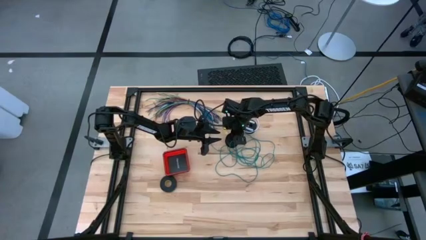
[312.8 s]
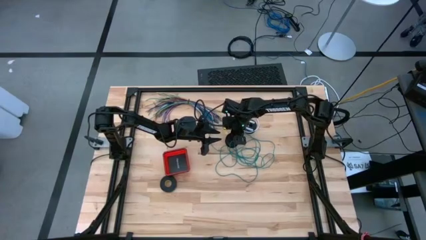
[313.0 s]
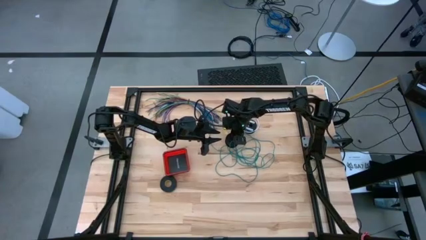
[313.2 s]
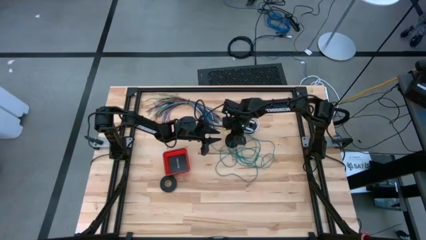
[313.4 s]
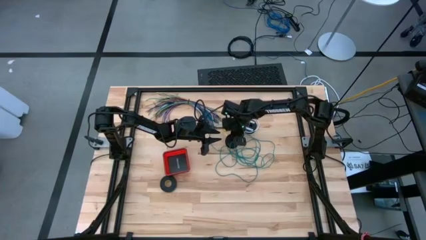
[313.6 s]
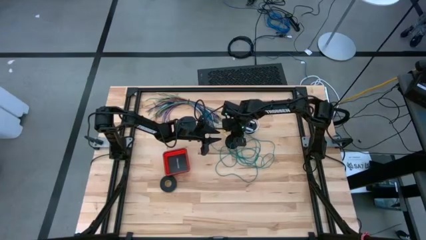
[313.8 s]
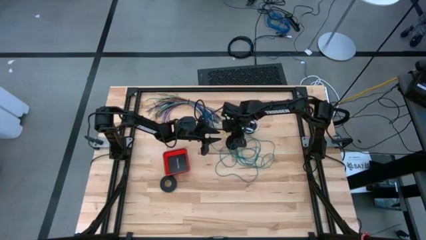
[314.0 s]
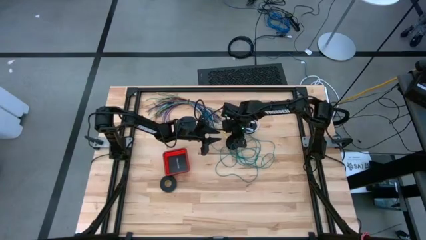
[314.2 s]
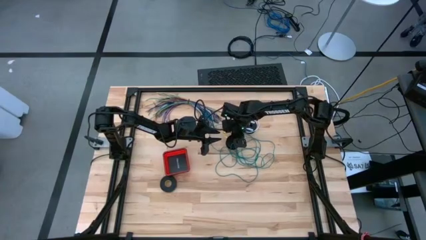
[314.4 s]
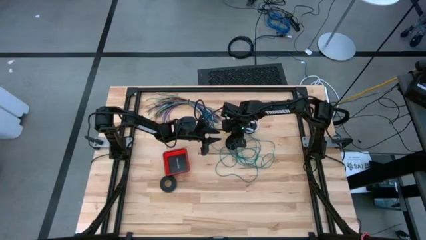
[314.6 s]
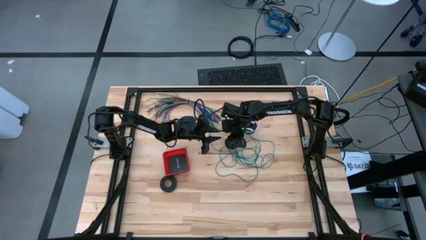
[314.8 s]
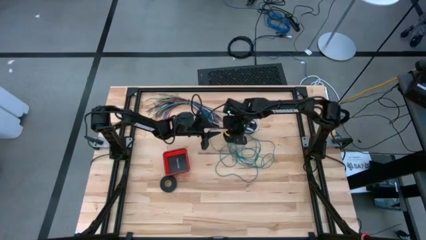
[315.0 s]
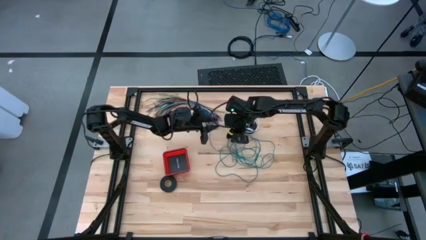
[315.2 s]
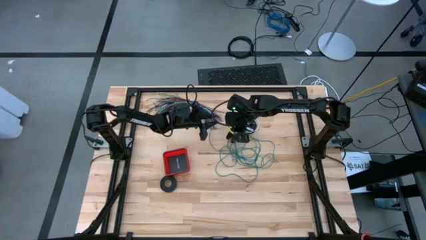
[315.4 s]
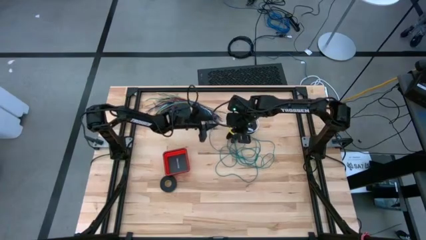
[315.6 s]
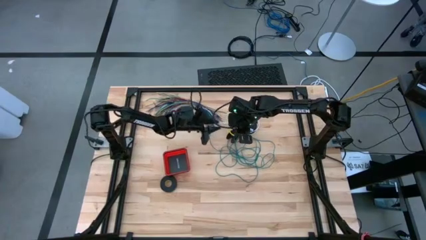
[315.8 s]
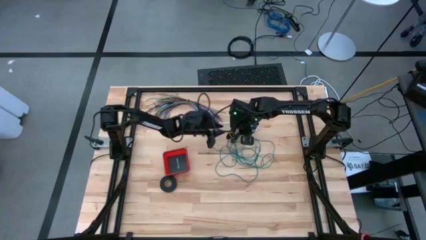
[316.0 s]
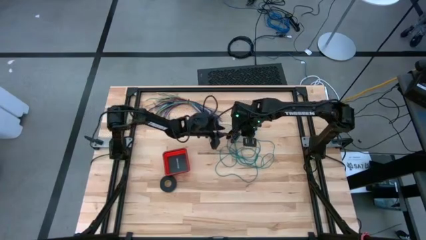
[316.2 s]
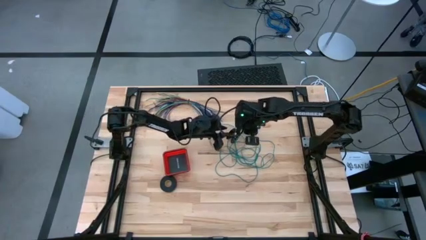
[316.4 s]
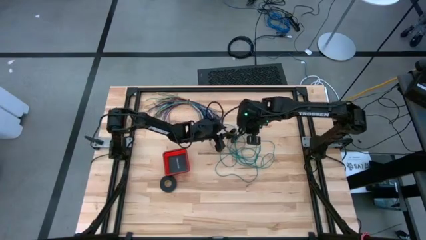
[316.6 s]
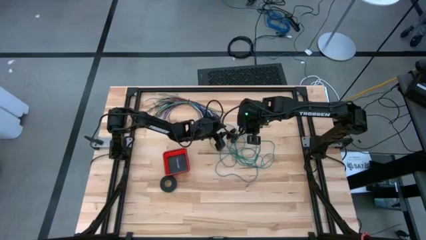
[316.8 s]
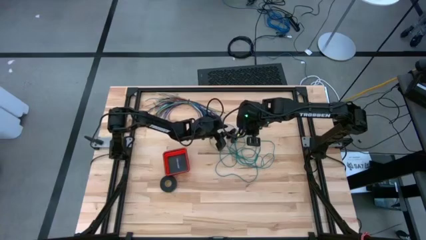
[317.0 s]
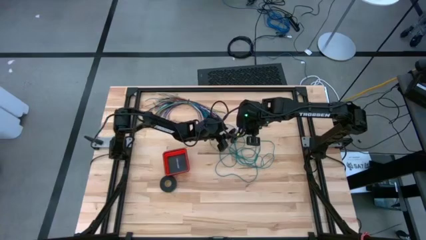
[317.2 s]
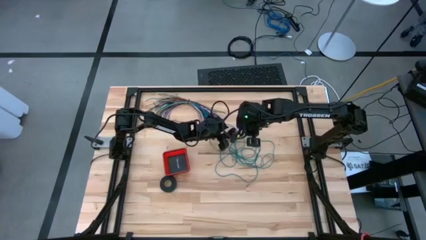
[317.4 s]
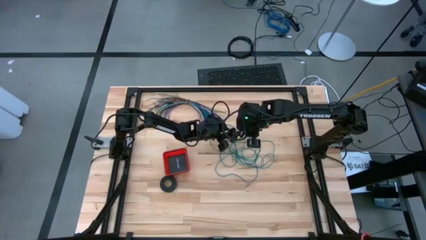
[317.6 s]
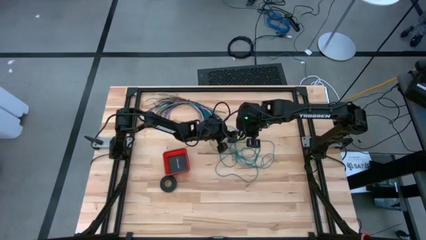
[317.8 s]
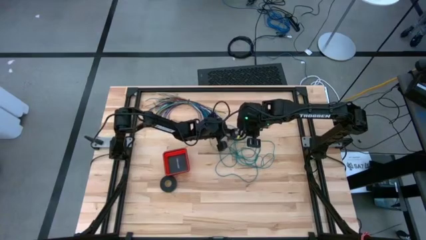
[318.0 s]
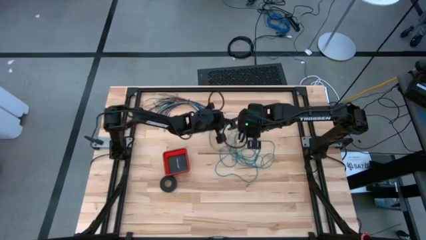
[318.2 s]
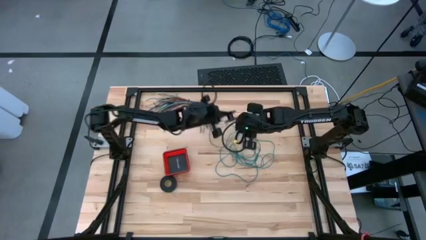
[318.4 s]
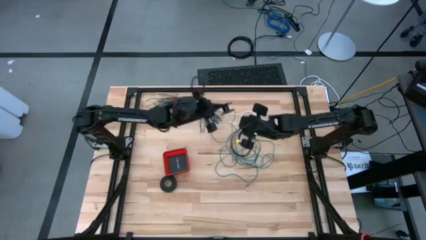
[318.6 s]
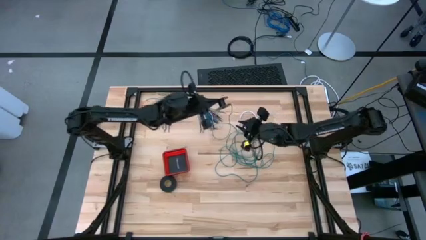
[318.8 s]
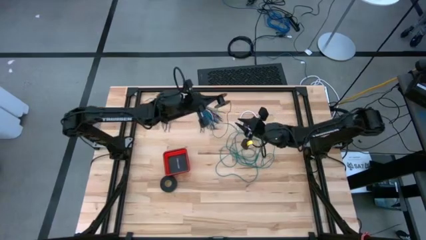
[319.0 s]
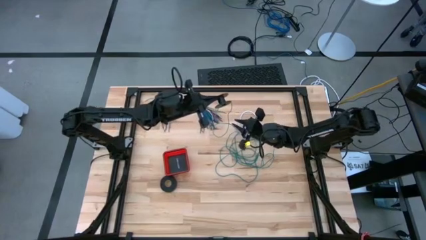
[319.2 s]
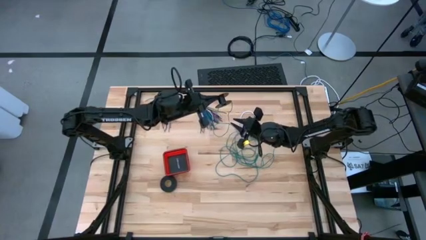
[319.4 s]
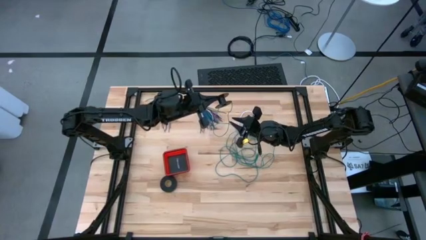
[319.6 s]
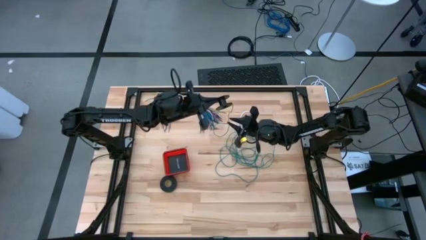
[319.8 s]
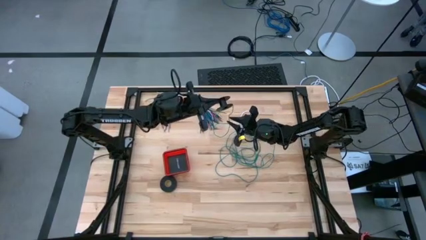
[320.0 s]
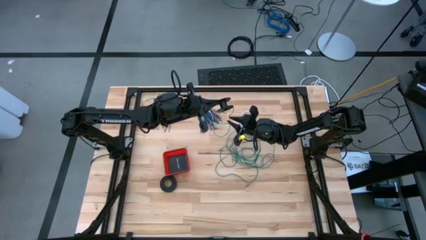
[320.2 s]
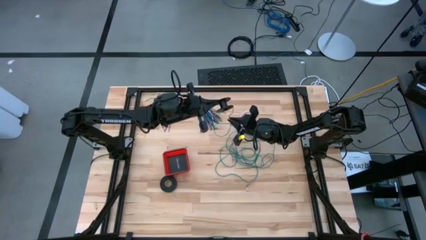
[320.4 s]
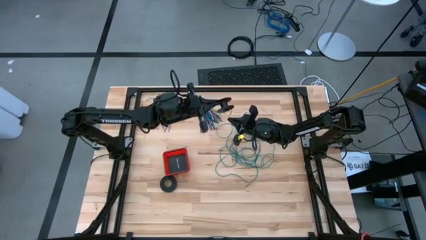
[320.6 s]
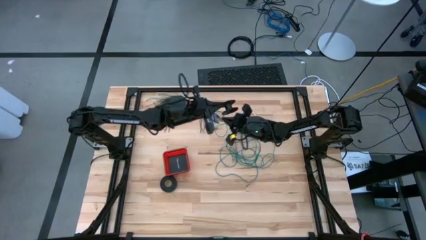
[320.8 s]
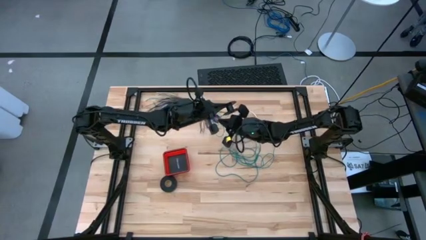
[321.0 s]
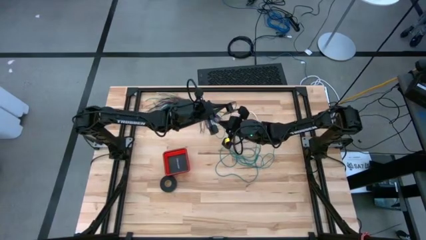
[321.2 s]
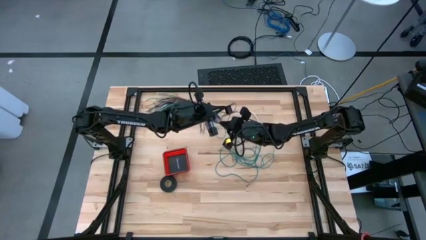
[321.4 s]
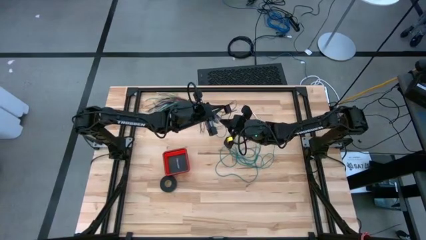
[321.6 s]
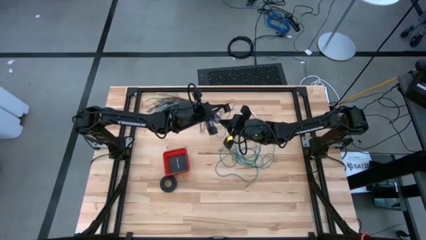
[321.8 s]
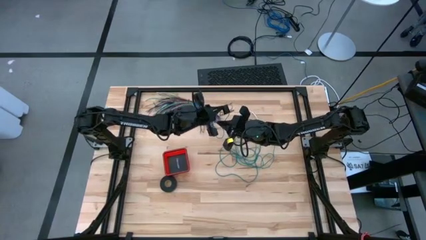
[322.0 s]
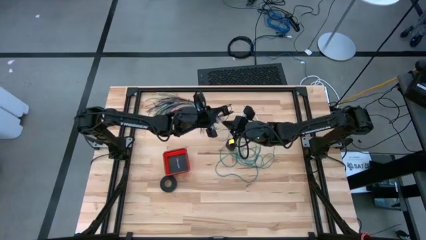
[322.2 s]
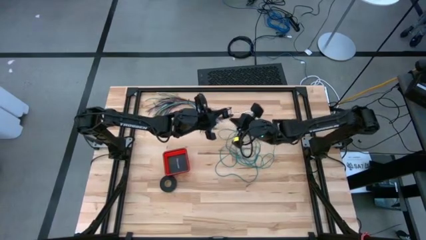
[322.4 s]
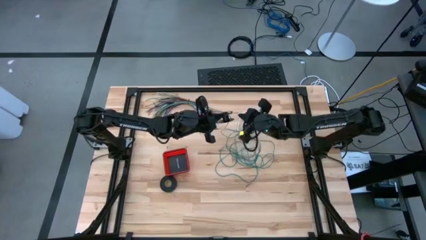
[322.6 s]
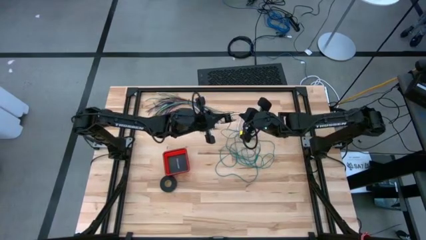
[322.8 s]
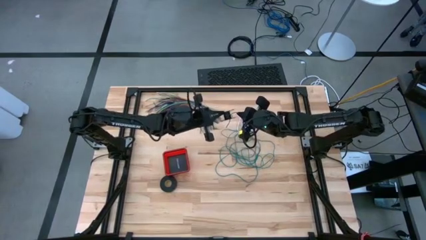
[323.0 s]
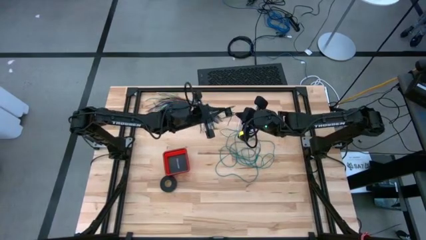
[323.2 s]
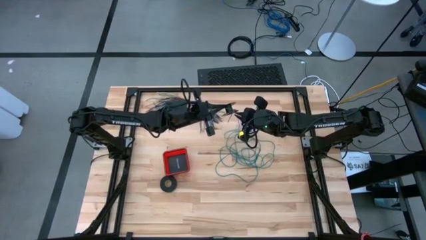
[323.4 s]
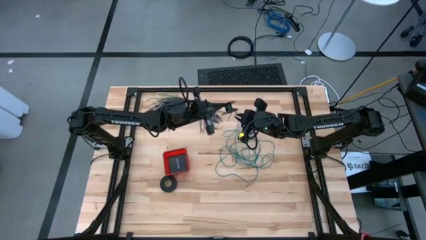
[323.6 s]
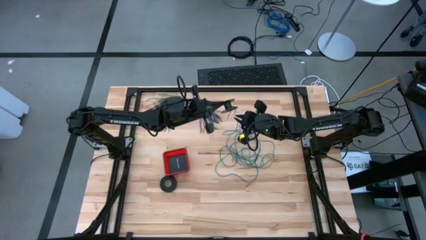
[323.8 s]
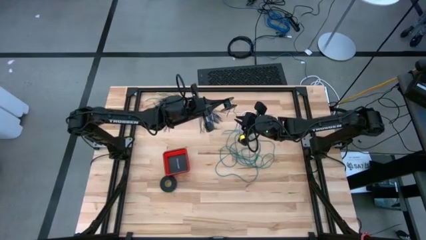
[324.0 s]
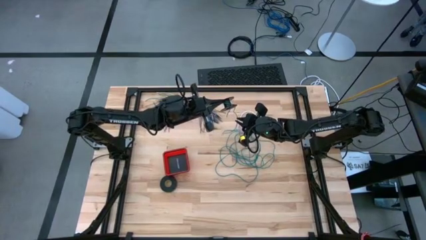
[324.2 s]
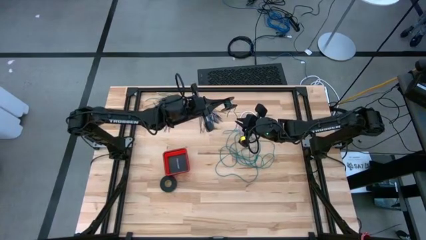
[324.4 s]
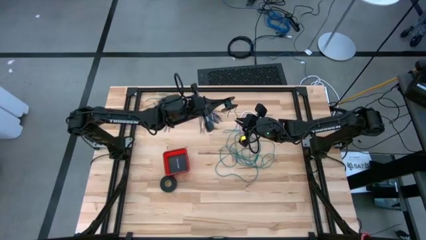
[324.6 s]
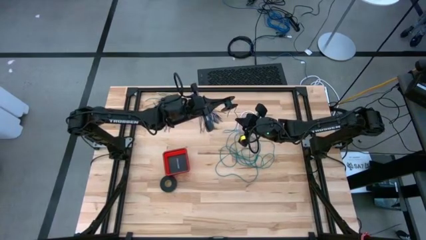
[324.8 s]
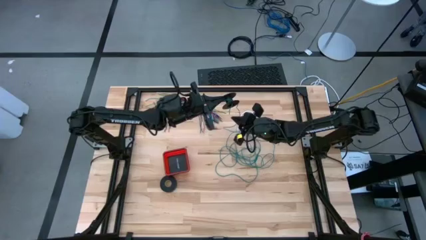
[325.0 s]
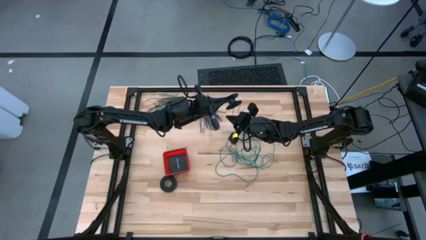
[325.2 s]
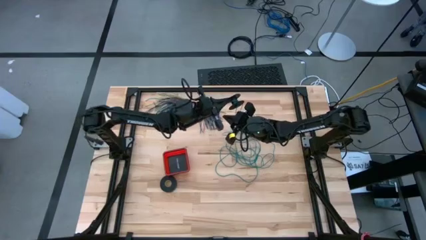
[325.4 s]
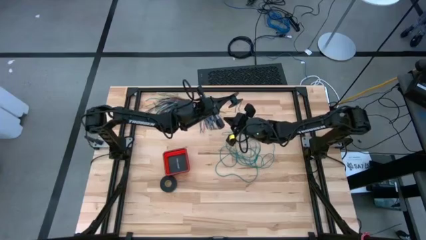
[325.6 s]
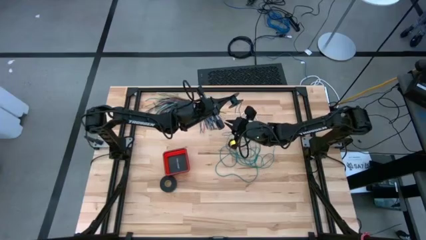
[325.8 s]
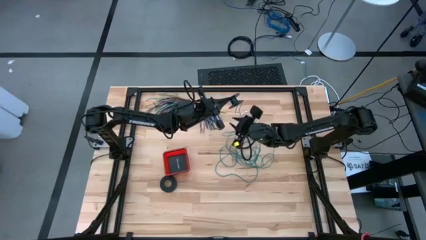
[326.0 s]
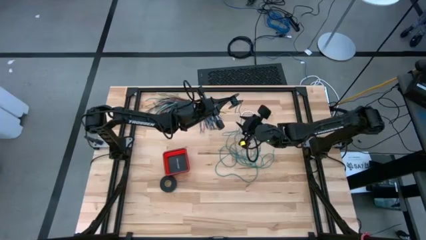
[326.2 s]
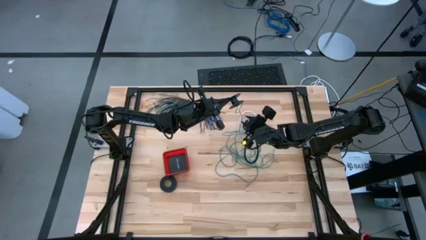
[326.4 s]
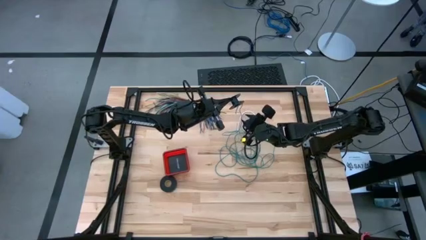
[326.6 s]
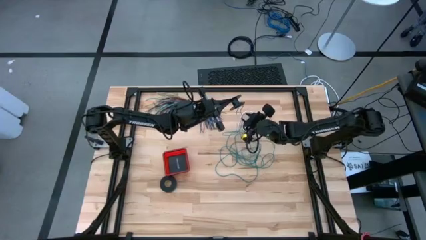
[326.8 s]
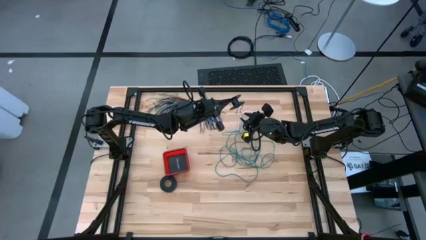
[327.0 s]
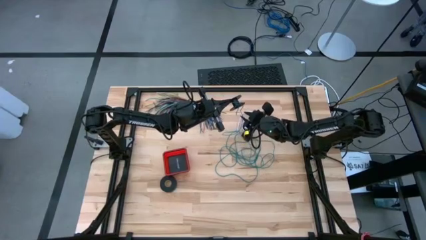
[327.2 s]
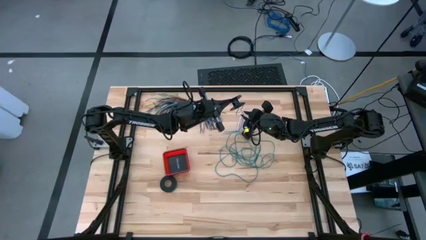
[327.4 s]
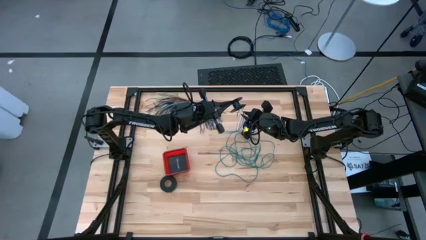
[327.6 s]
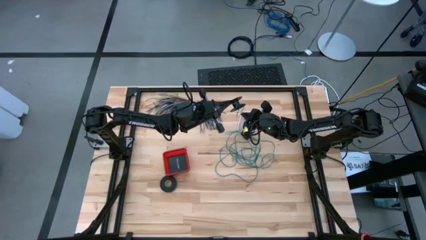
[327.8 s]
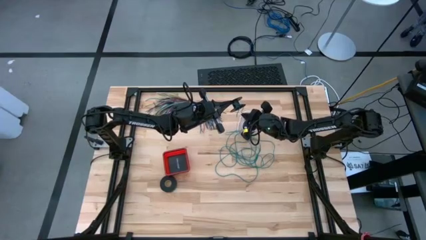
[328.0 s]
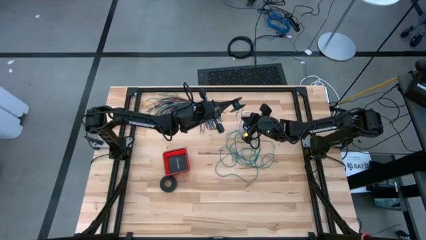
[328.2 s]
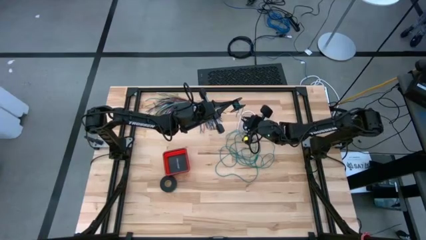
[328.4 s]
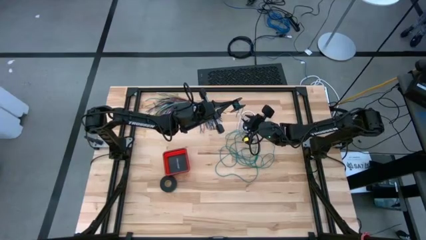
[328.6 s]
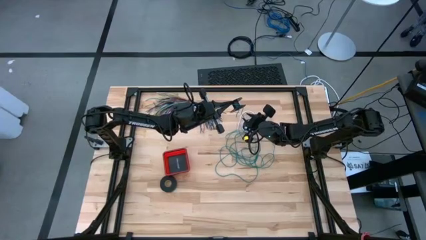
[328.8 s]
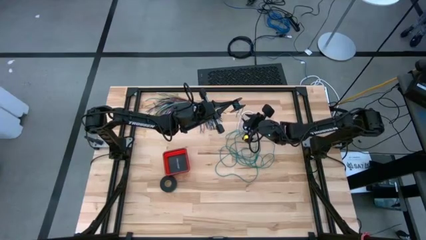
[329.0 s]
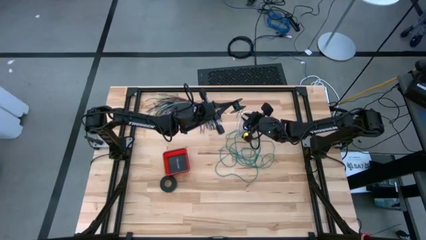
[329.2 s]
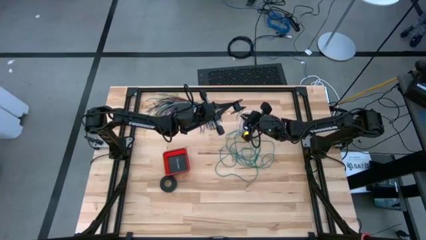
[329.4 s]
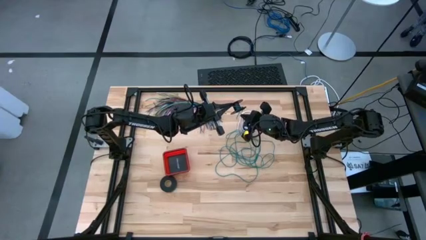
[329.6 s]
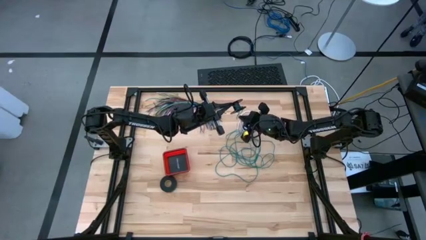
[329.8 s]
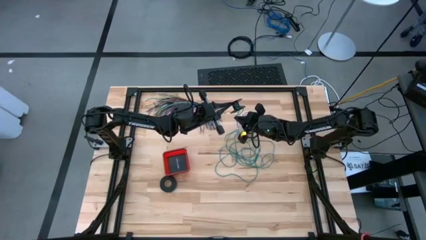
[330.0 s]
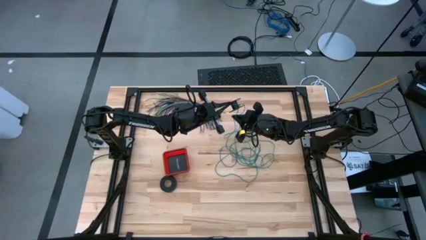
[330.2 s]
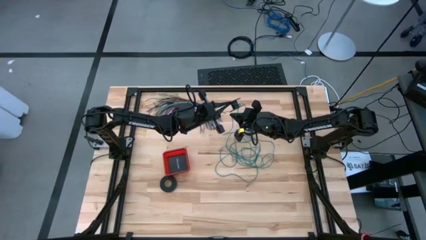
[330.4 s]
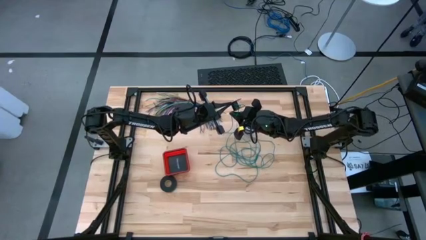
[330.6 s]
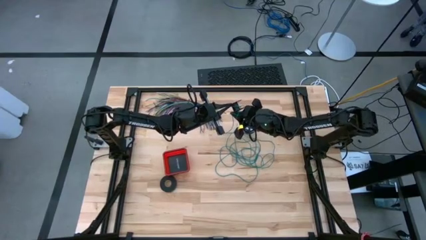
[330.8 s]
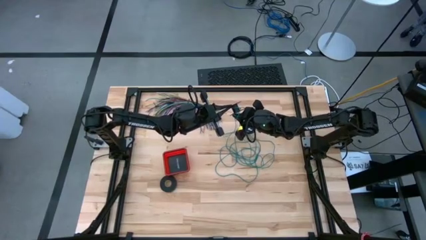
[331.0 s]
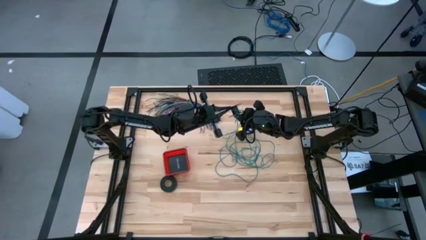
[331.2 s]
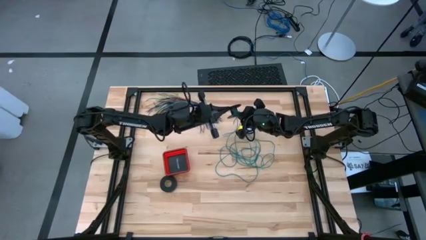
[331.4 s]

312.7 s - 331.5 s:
Task: Coil cords
Coil the green wire onto the spool
